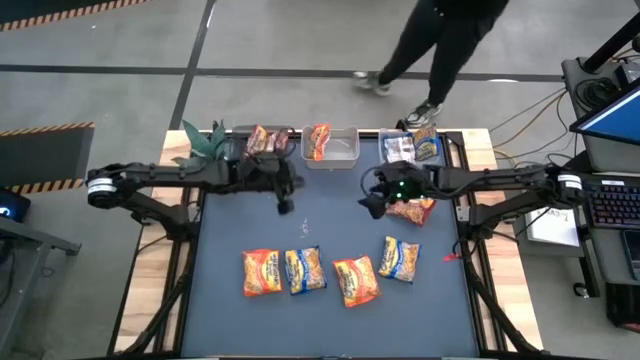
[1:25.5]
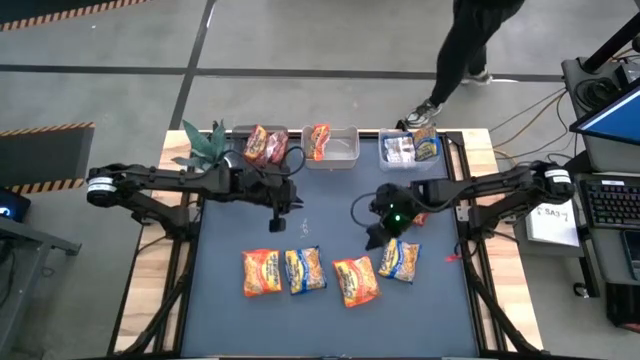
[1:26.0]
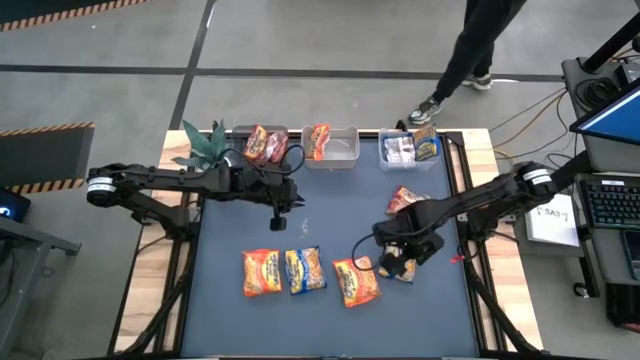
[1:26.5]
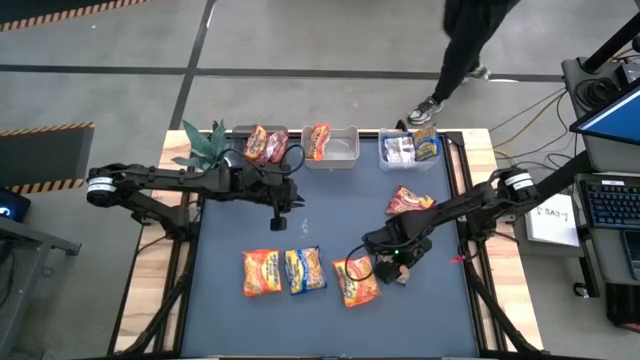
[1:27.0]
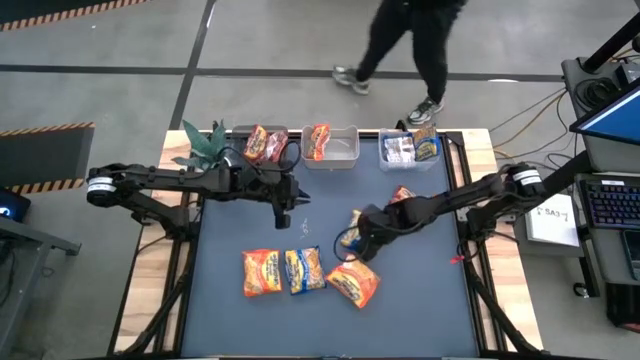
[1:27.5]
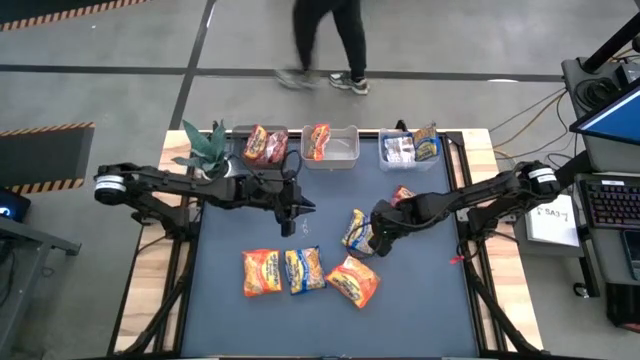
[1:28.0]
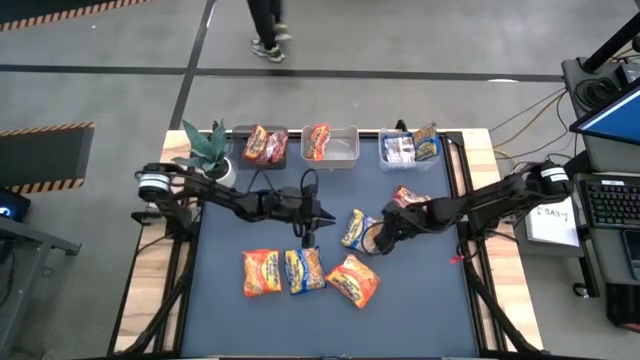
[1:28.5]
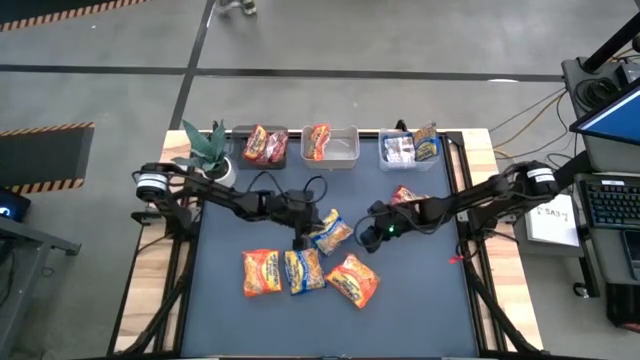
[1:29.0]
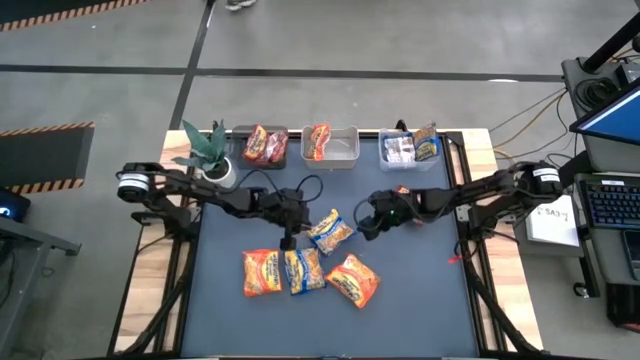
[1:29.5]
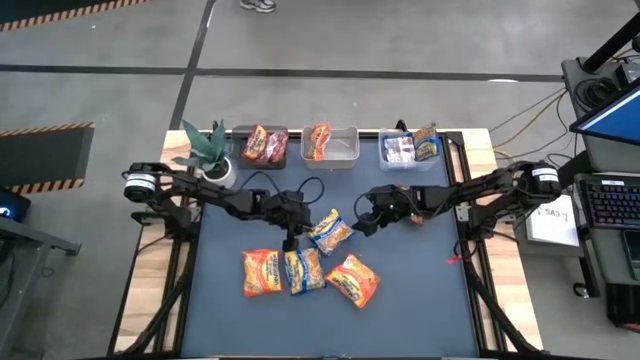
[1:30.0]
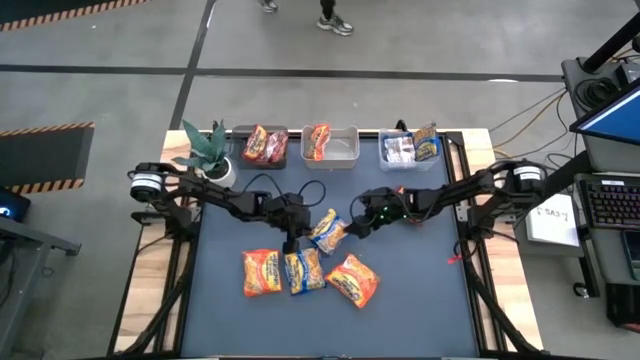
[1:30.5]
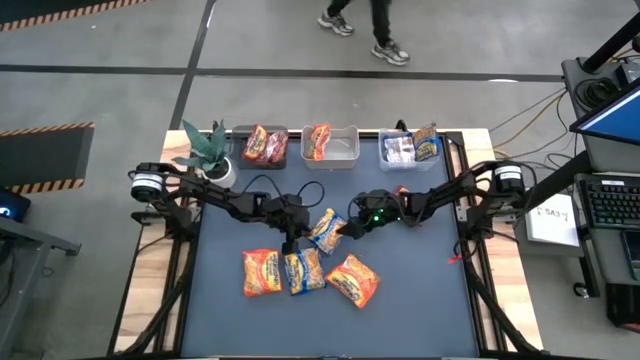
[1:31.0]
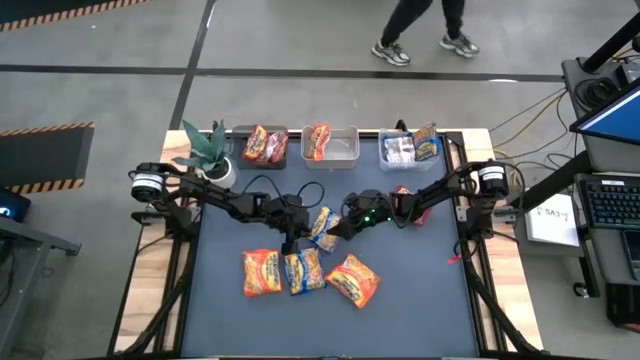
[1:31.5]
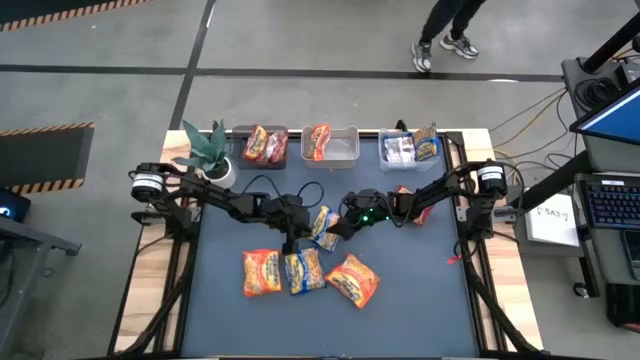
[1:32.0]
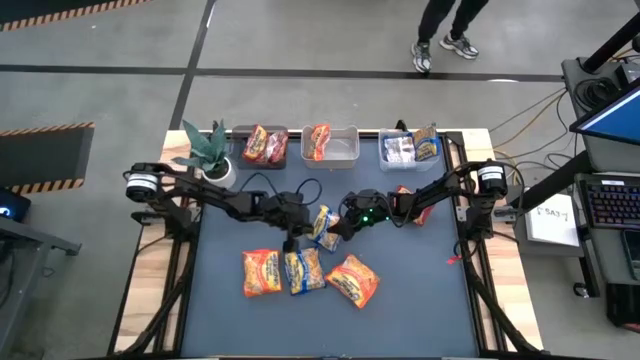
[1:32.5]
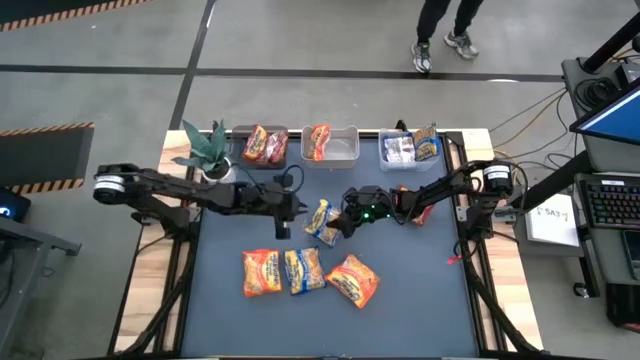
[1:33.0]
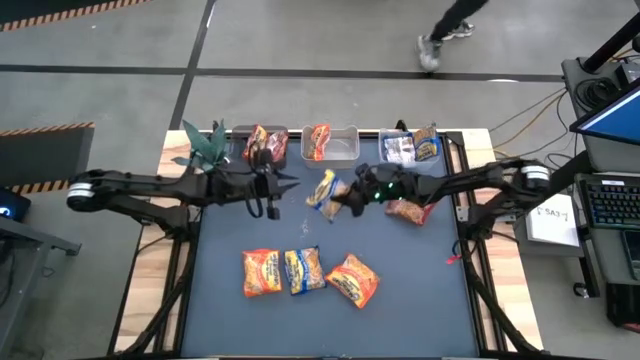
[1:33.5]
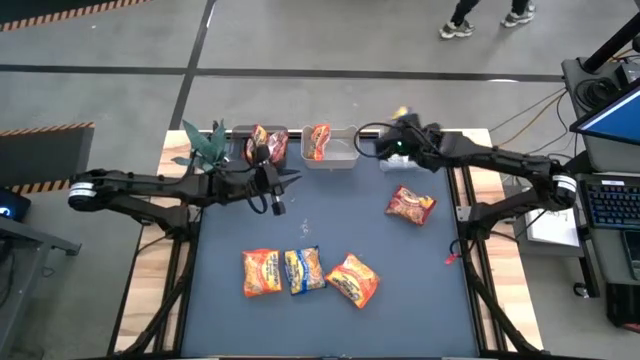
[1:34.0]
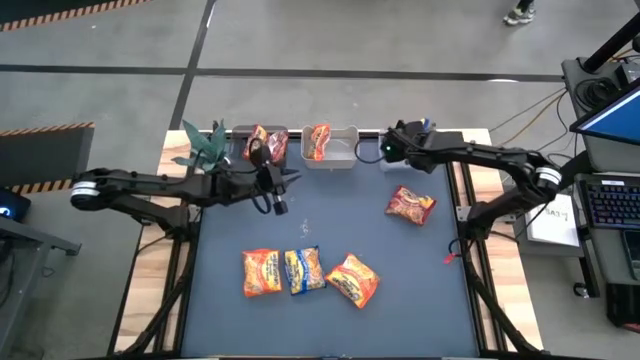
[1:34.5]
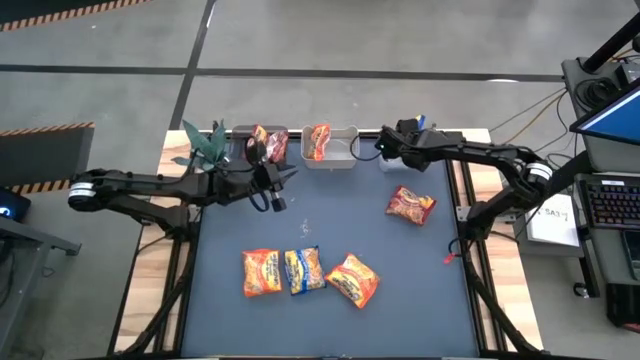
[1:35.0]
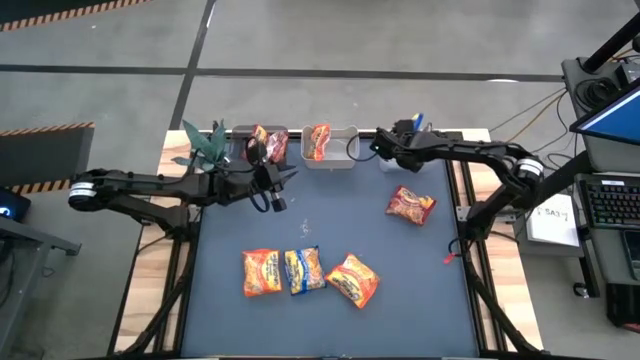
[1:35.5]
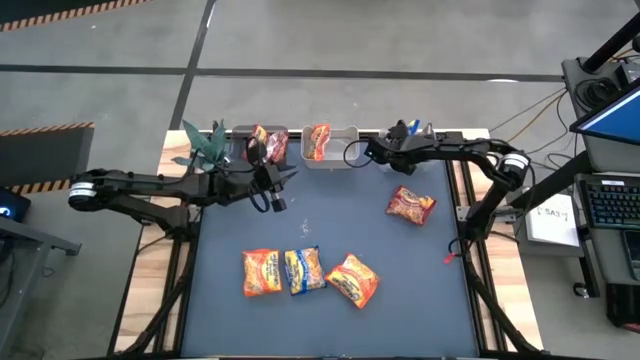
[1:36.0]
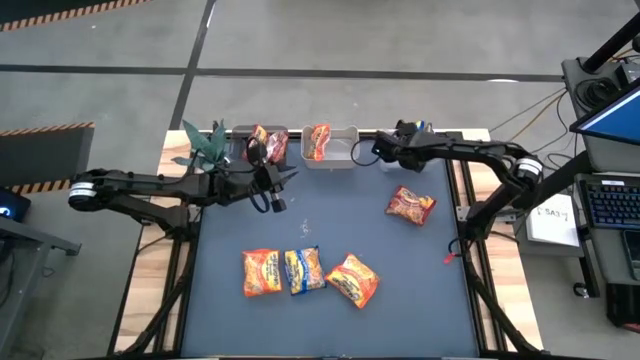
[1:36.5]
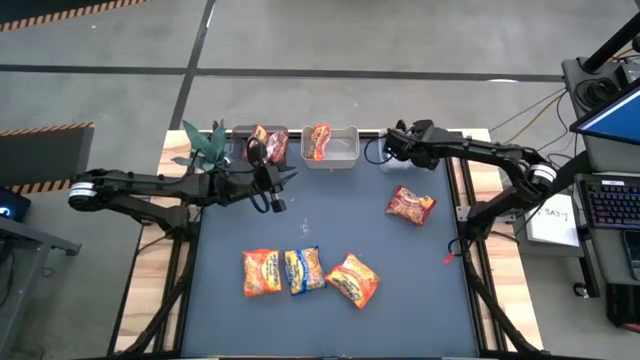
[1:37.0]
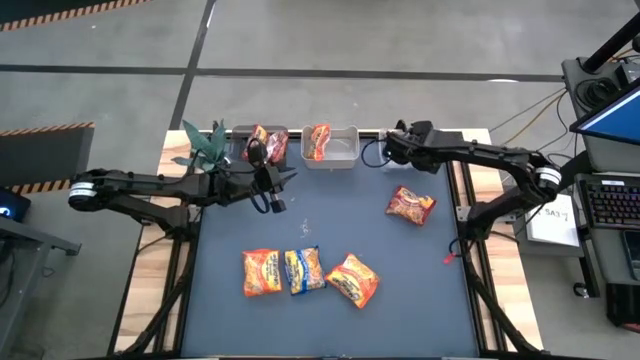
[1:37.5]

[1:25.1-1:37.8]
Task: Sort Maruchan noodles
Put the right blue noodle pack into the transparent white bin

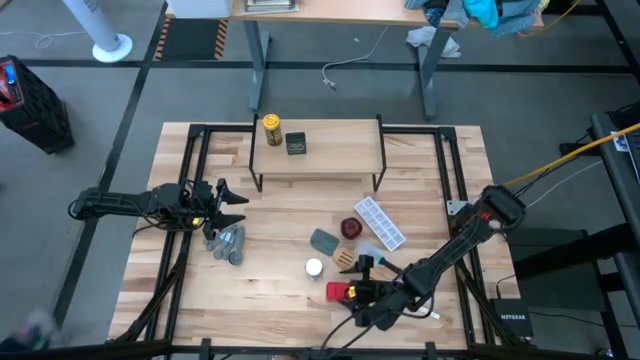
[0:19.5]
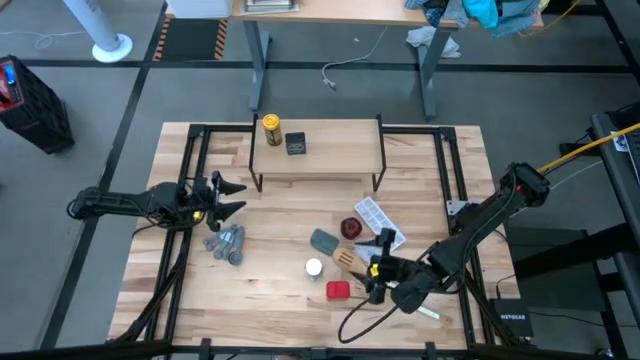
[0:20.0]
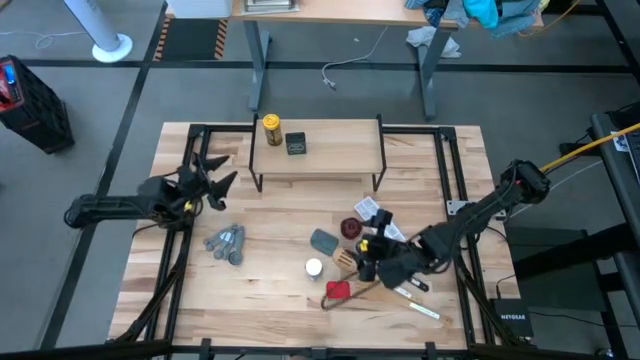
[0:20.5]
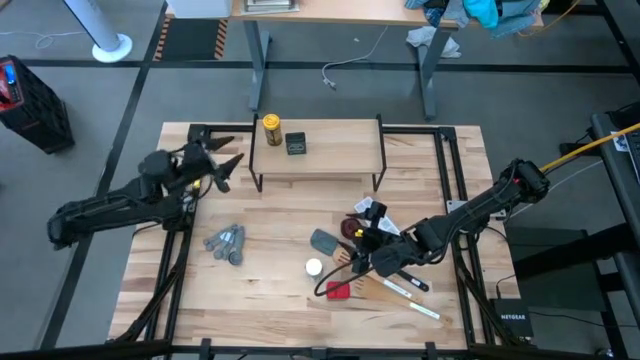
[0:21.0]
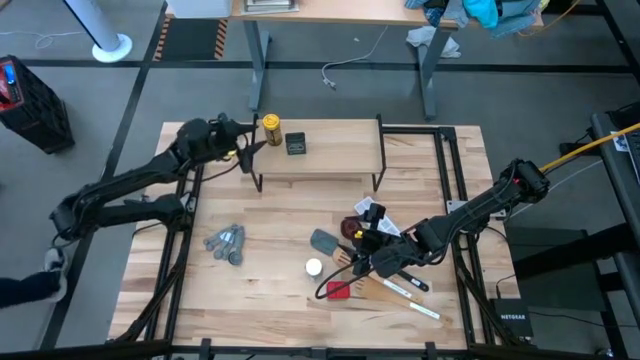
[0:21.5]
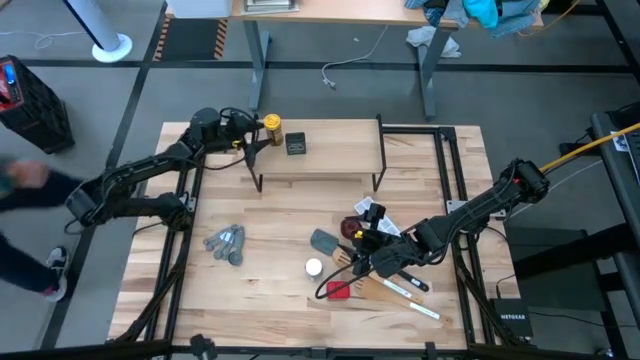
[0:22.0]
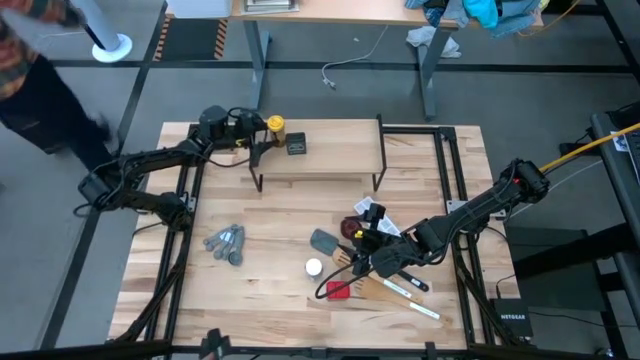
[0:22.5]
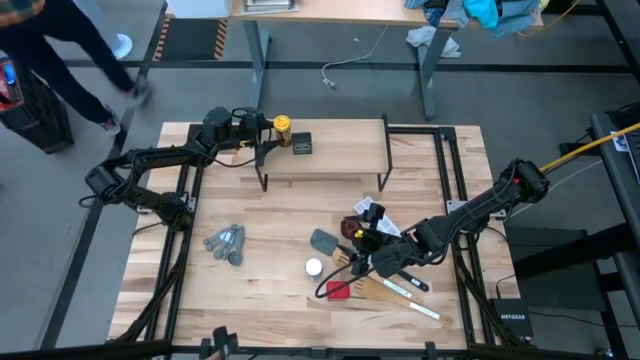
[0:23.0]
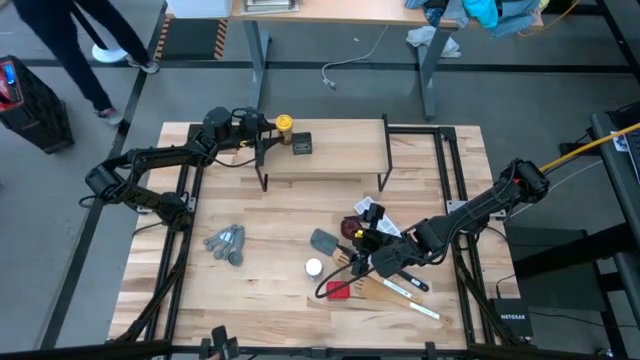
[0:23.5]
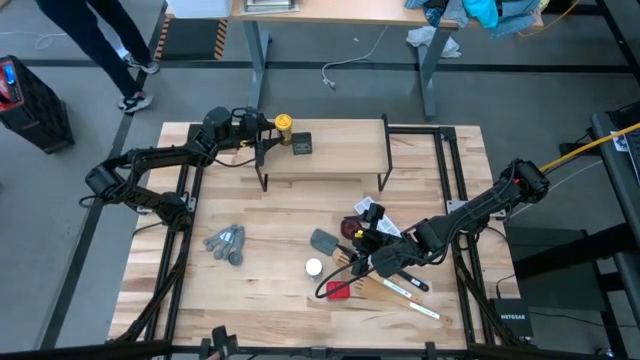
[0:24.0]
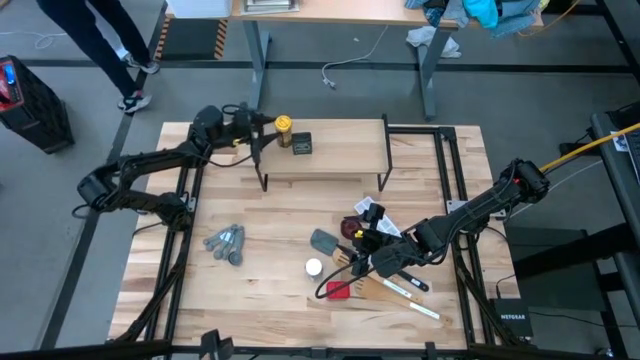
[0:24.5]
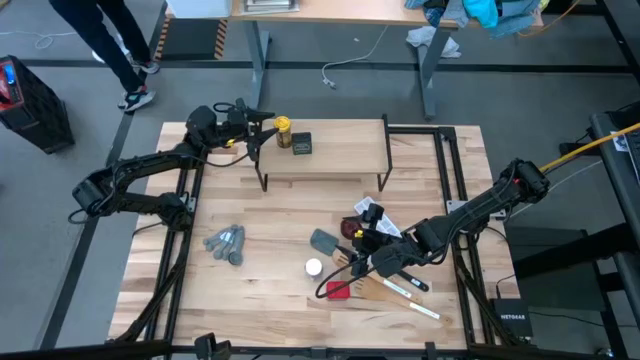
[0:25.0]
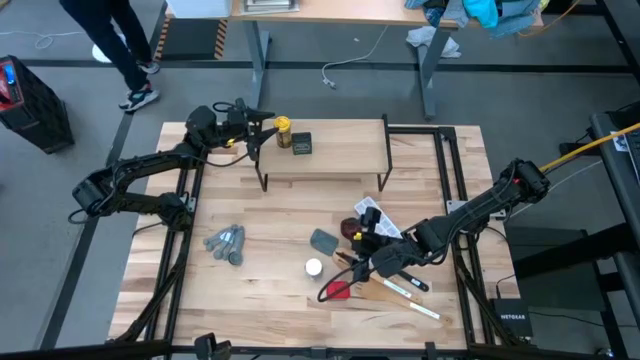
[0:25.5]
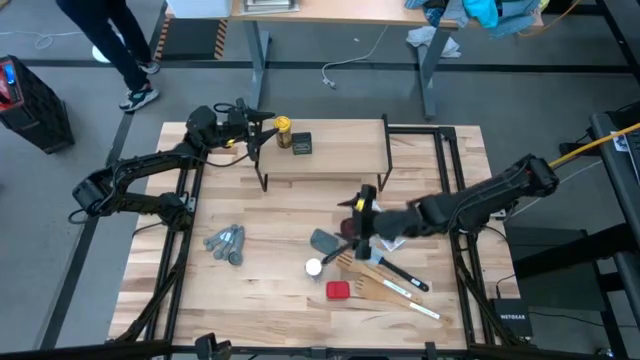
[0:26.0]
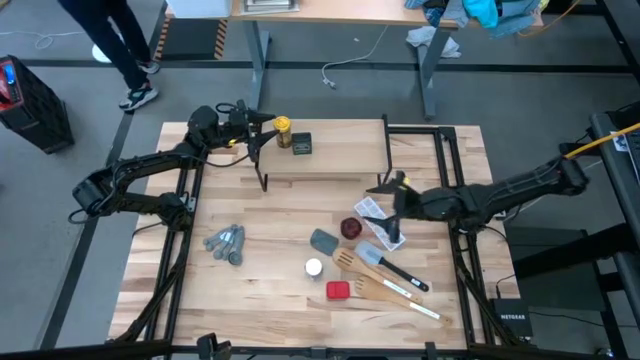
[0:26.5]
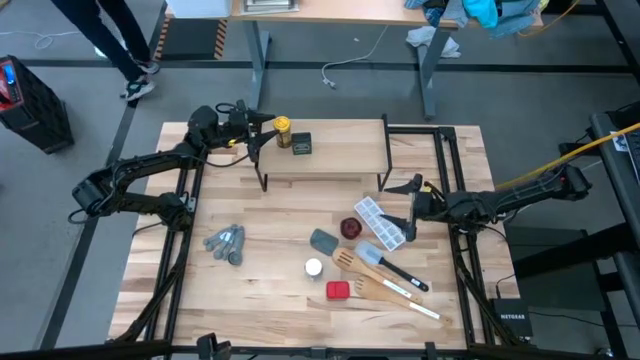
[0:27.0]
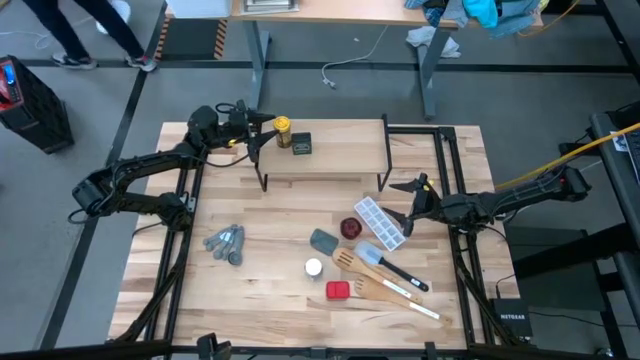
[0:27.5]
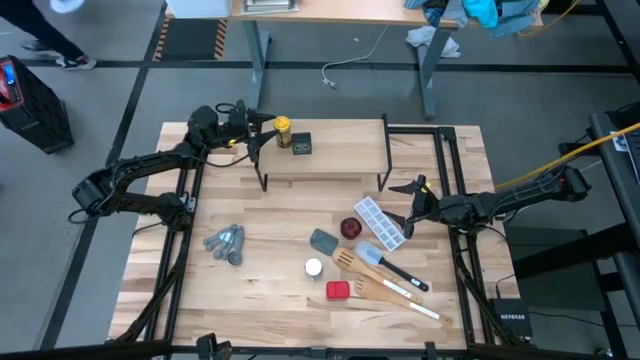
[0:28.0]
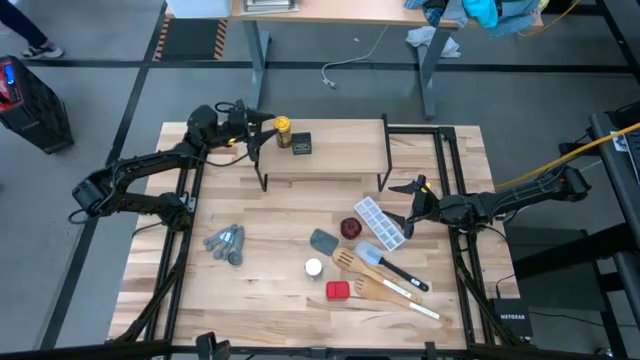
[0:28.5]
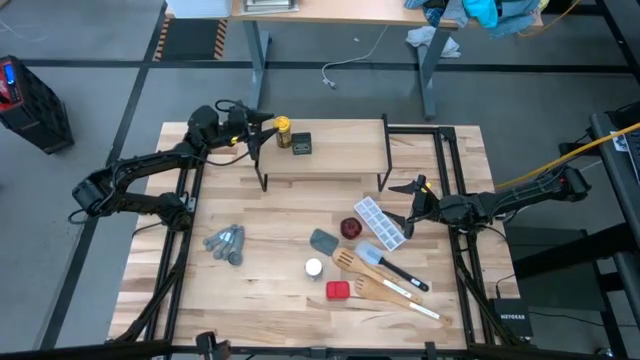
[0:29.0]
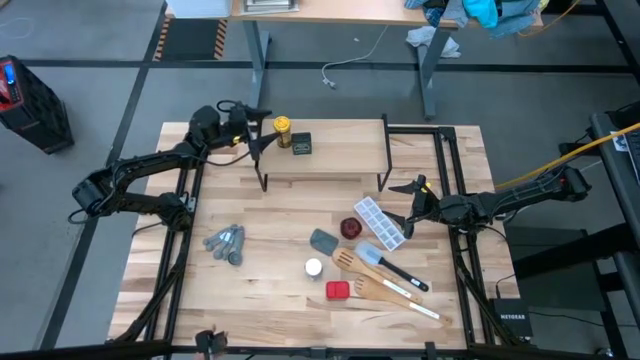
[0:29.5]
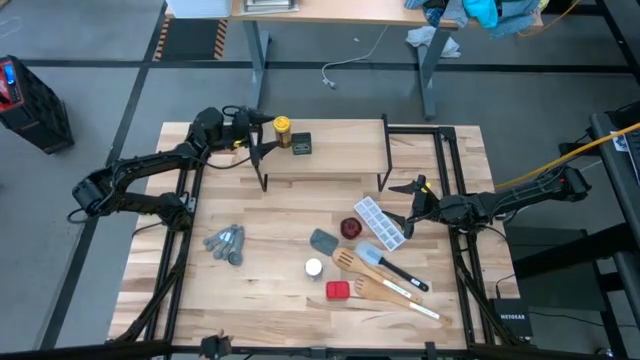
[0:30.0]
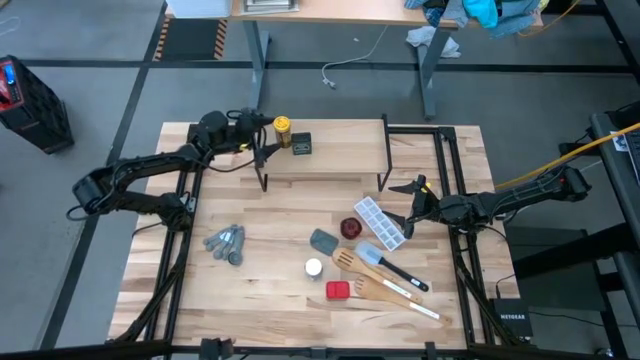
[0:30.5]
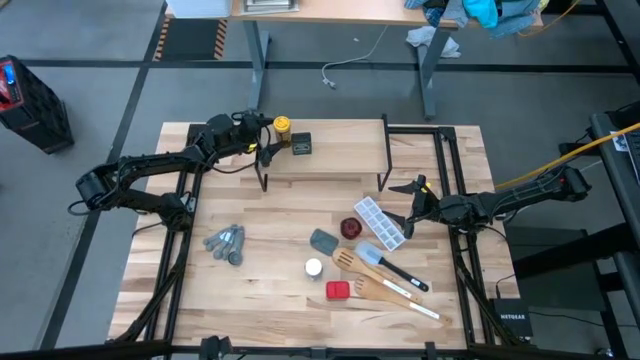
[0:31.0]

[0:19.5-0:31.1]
Task: Shelf spices
Remove the yellow seasoning bottle from the shelf
